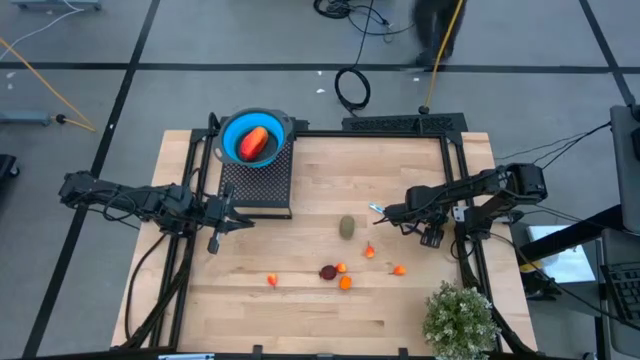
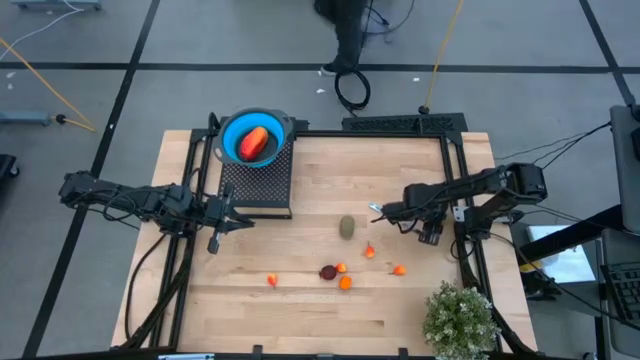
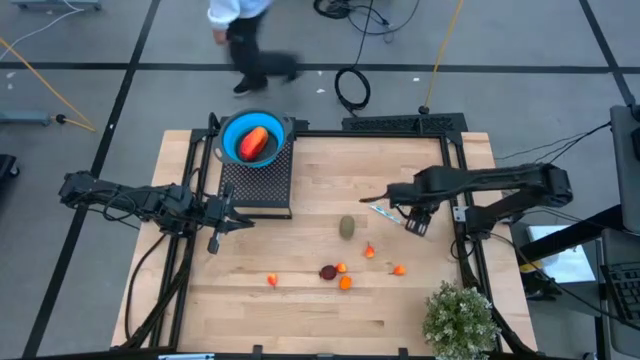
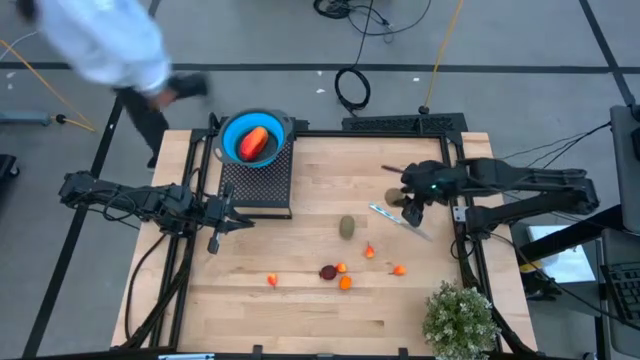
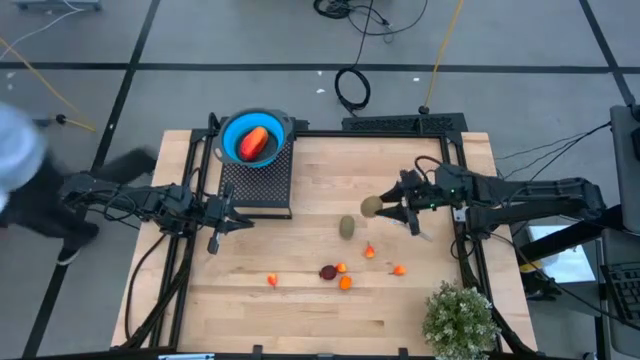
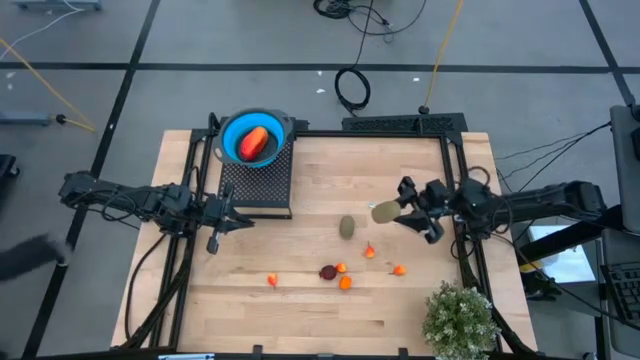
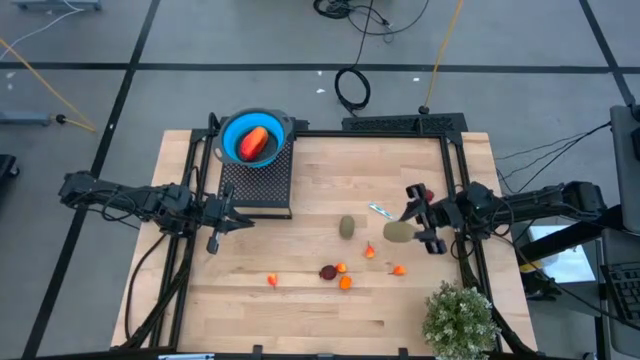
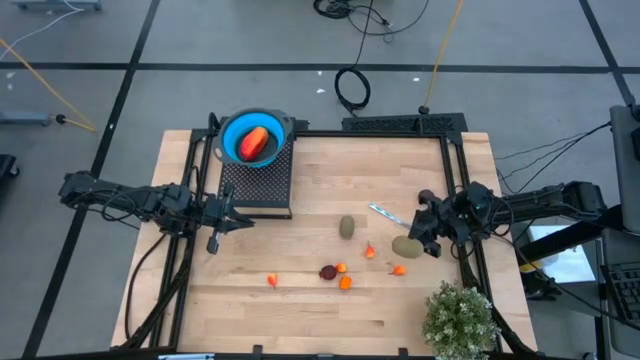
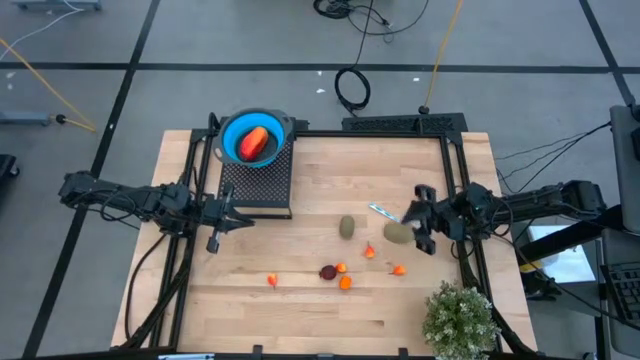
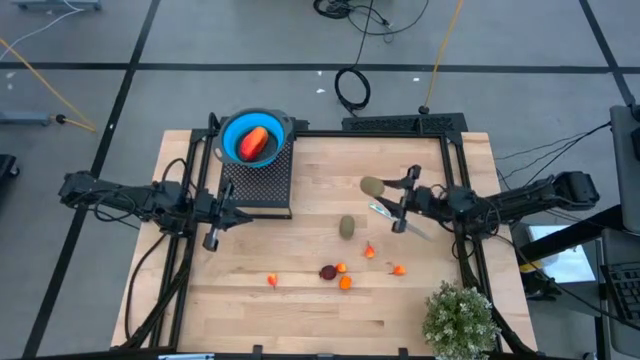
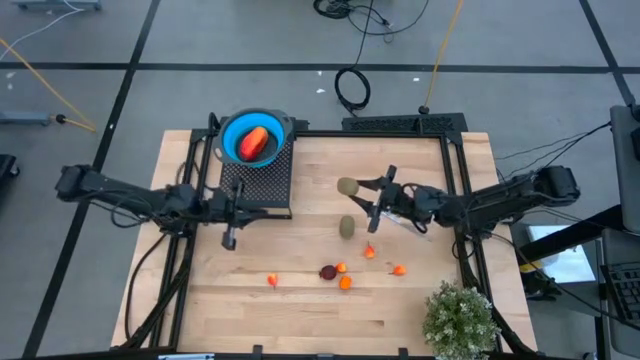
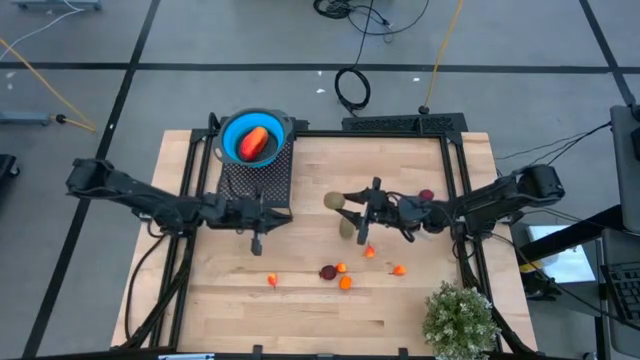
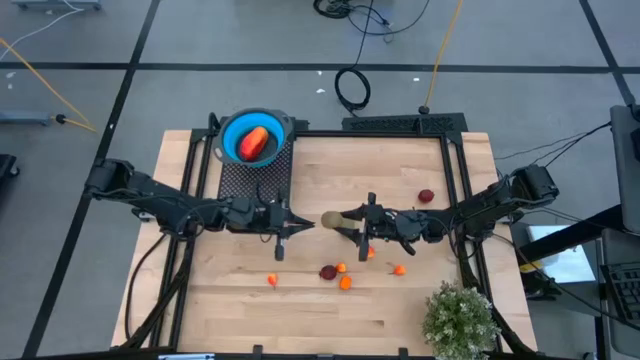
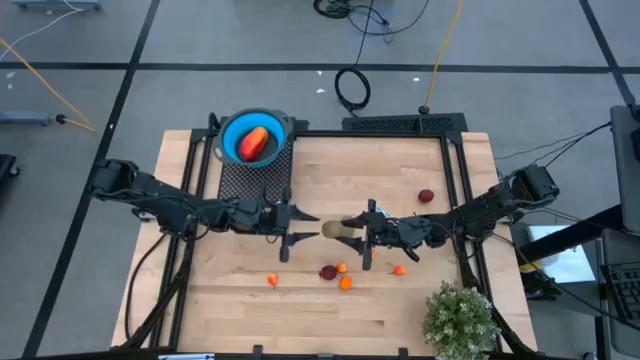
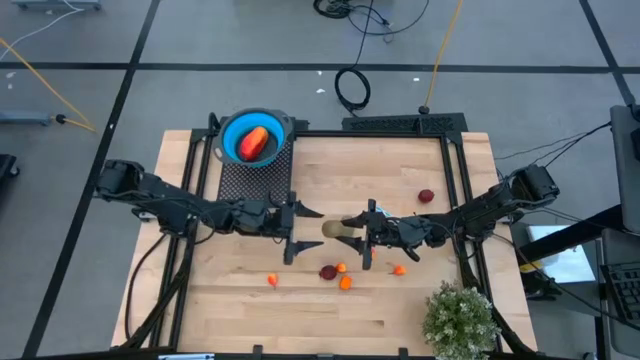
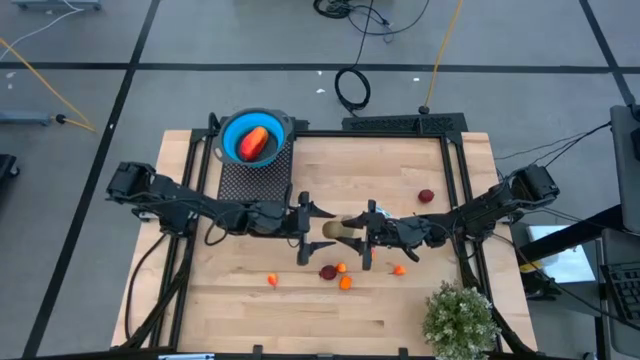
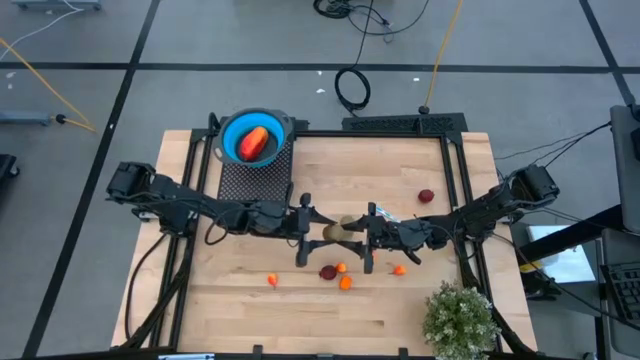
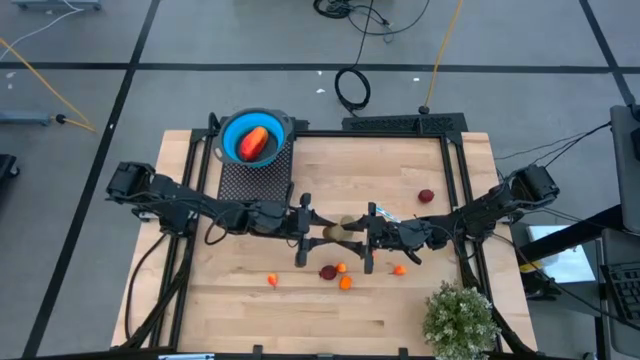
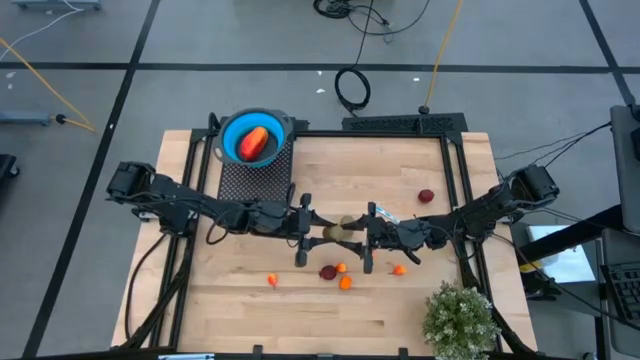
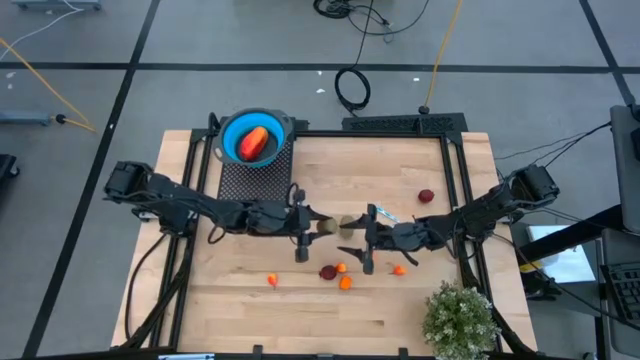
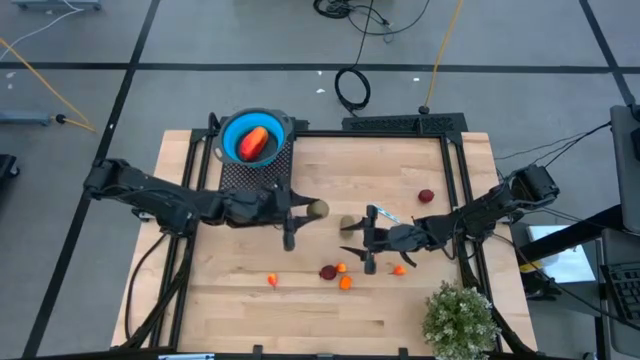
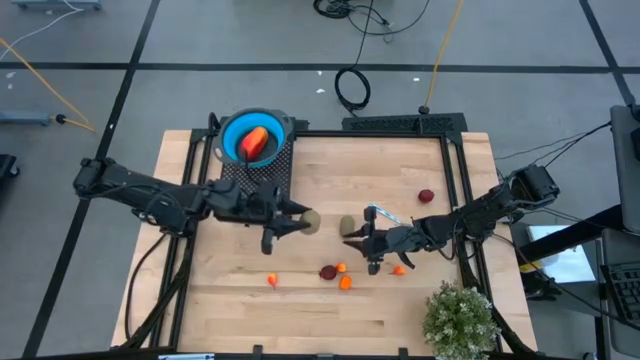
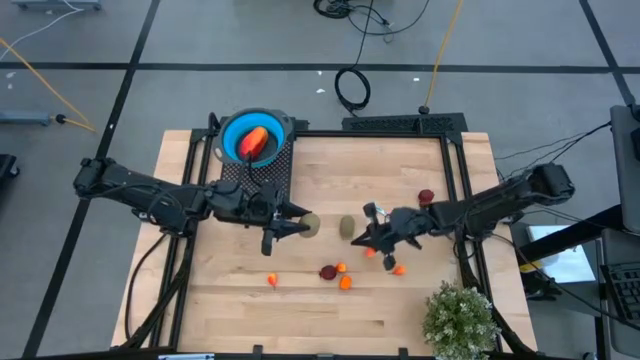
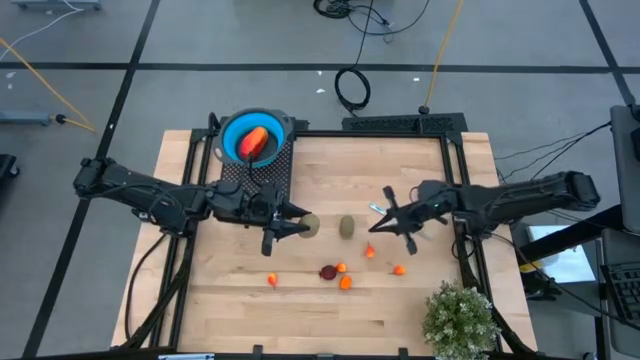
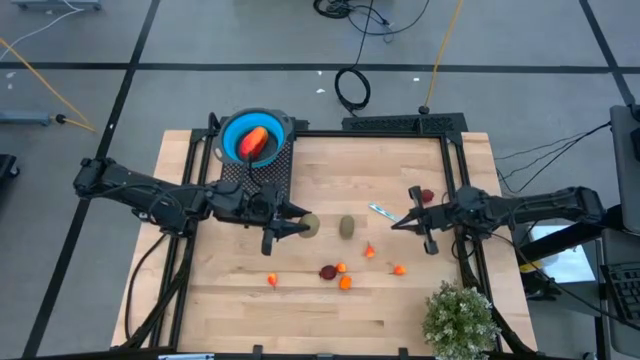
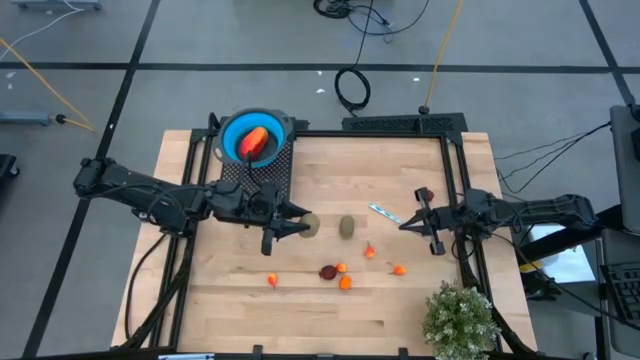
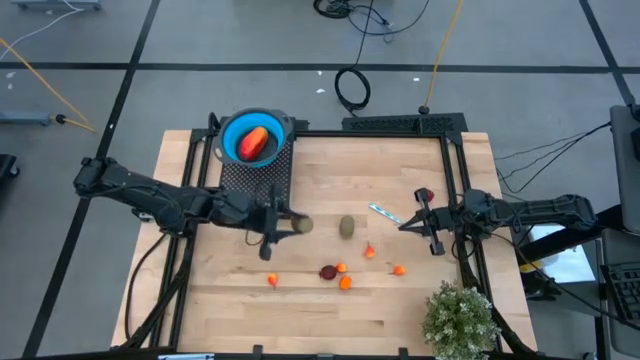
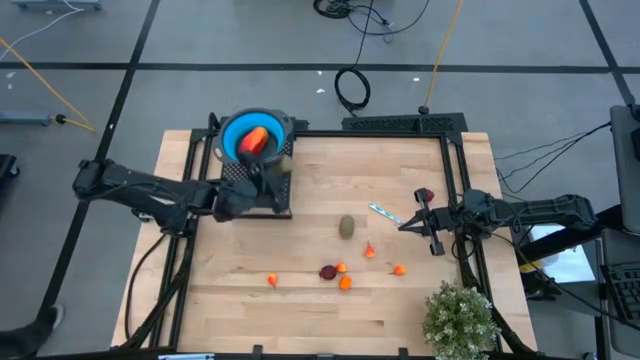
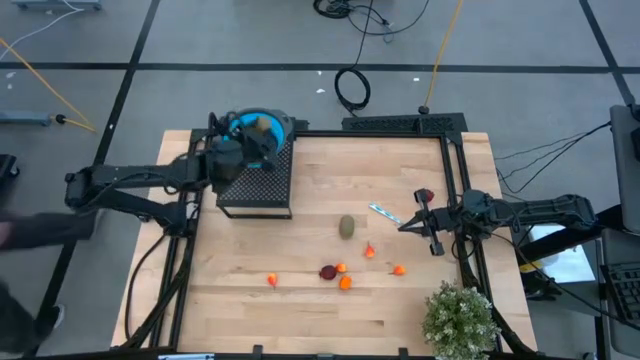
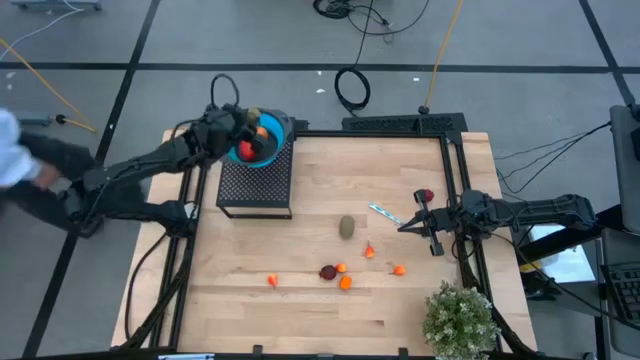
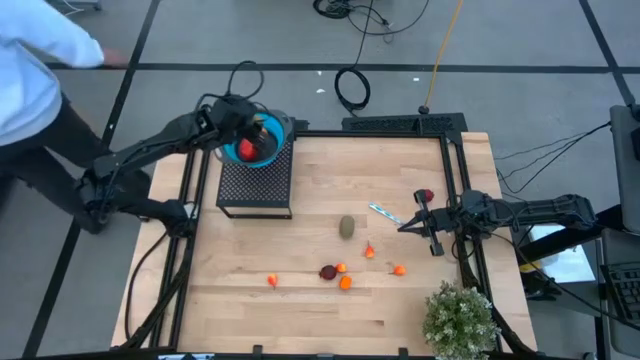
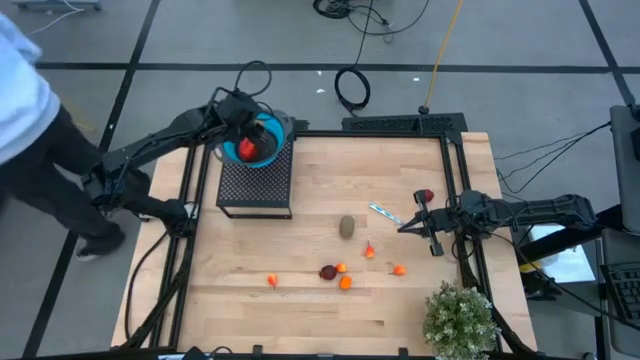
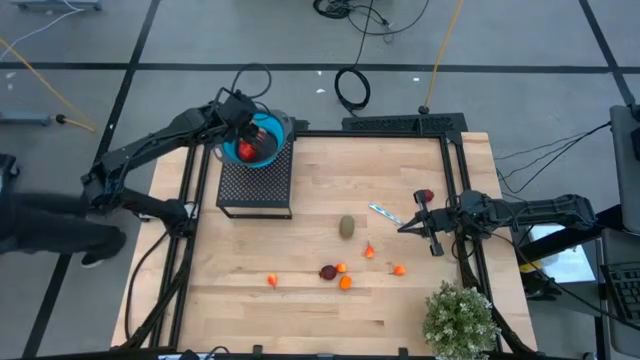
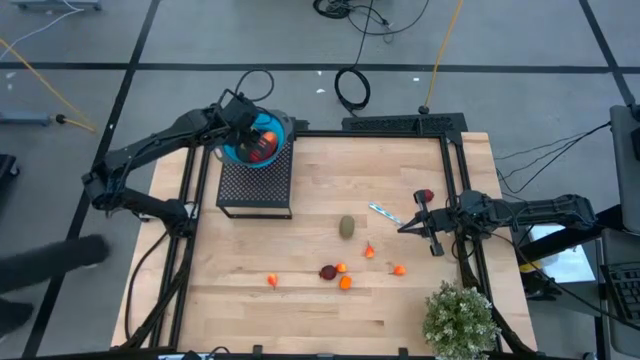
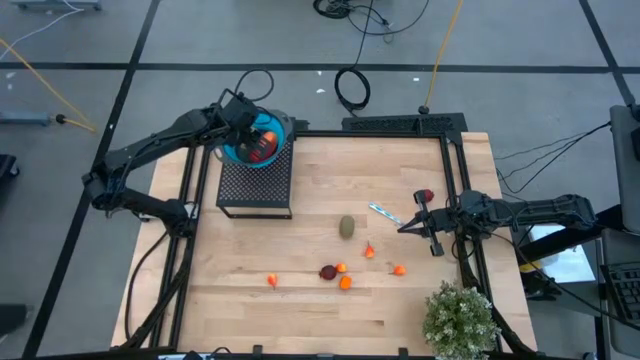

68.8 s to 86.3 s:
Task: Pick & Place Fruit
Put the brown kiwi into the blue strainer bowl on the shelf

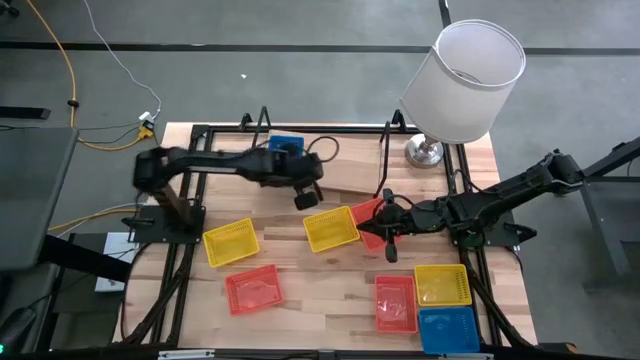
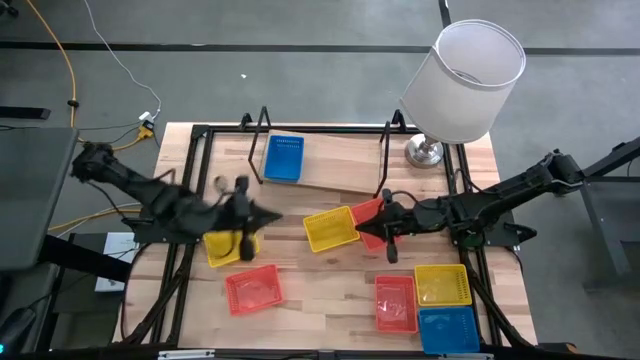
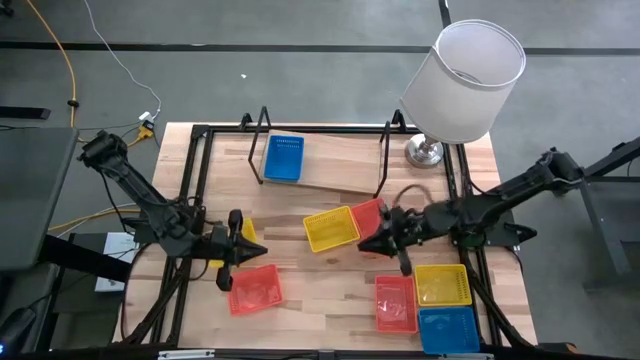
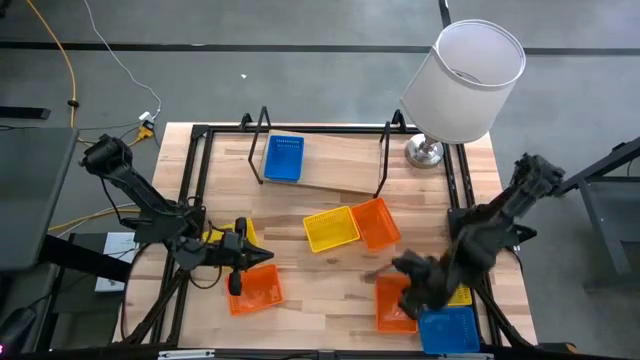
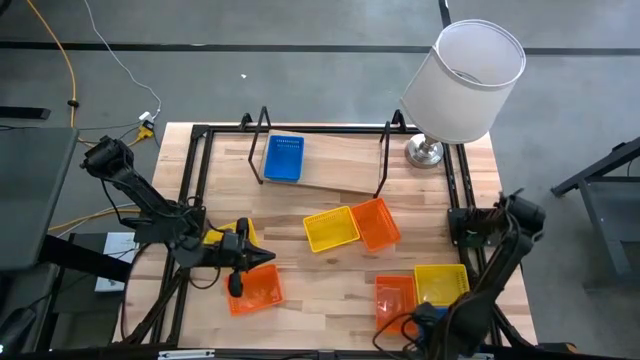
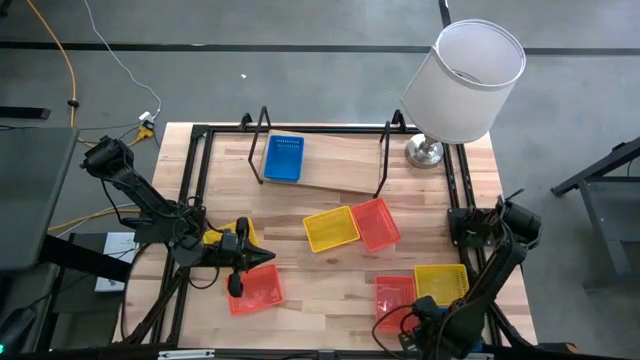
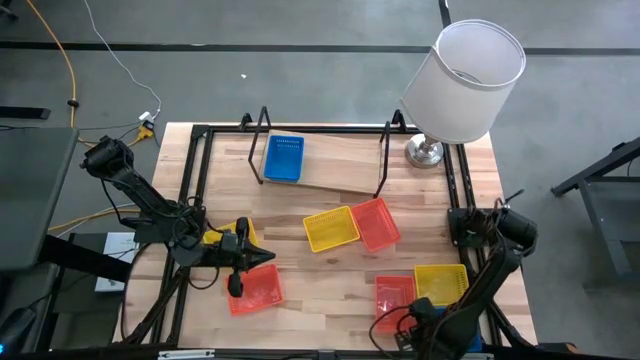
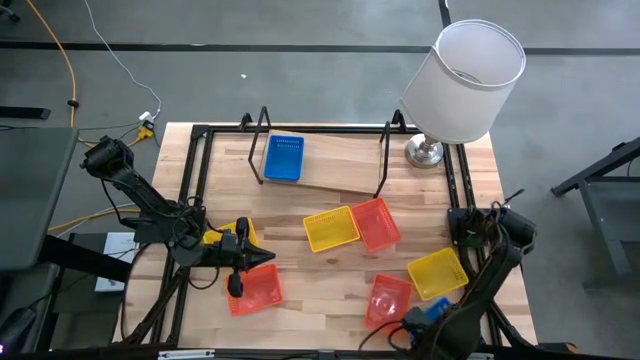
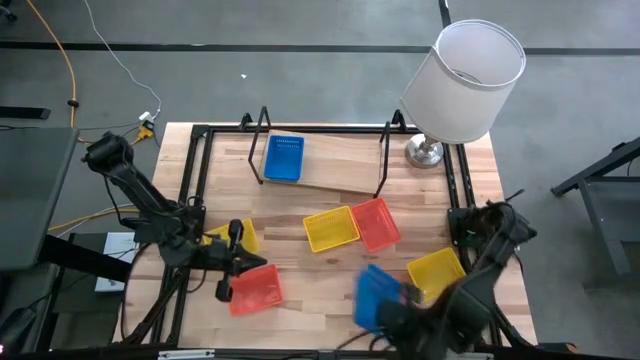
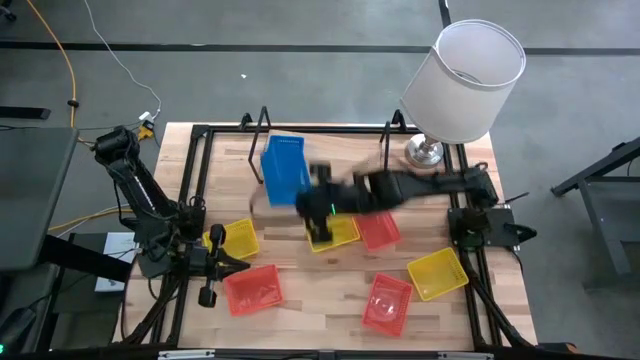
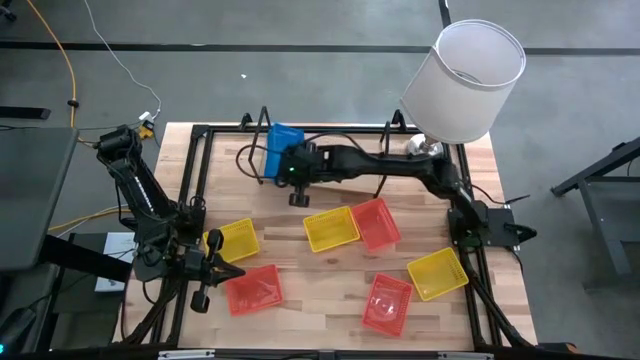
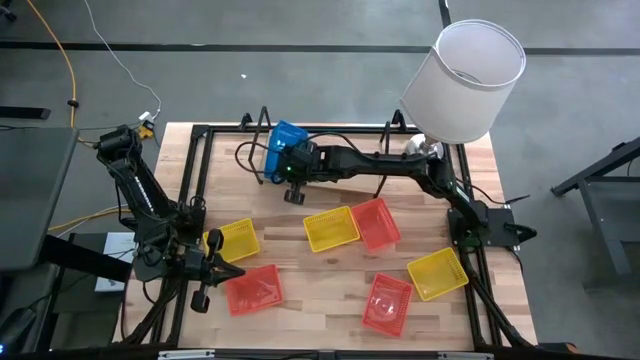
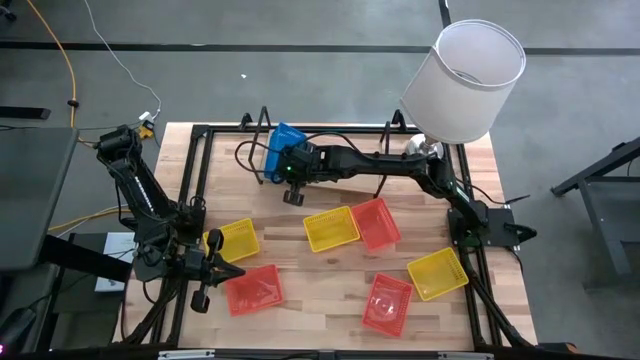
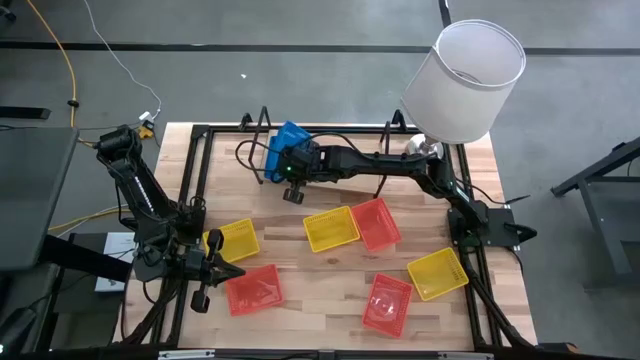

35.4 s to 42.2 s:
Task: Stack baskets on shelf by color
Stack the blue bin on the blue bin on the shelf
